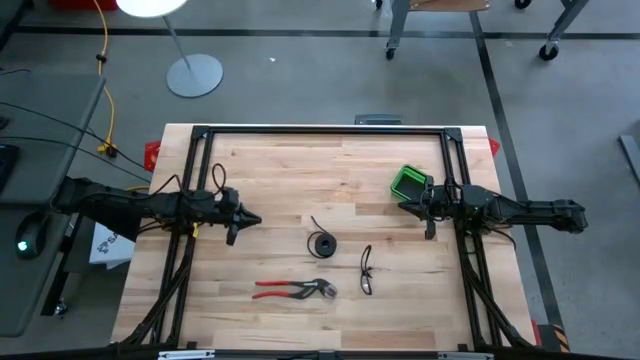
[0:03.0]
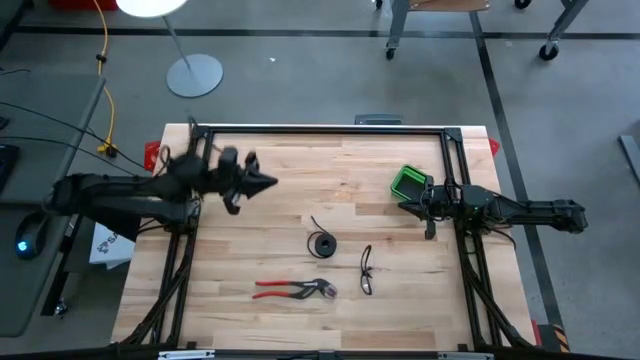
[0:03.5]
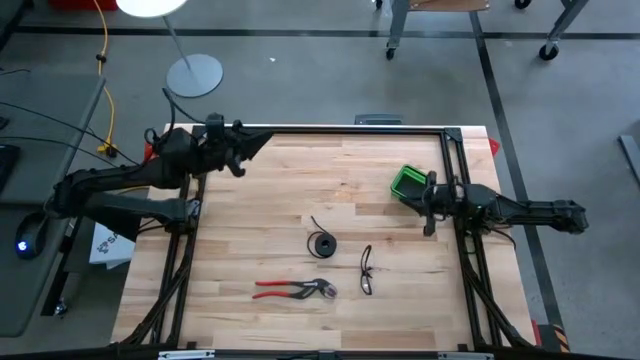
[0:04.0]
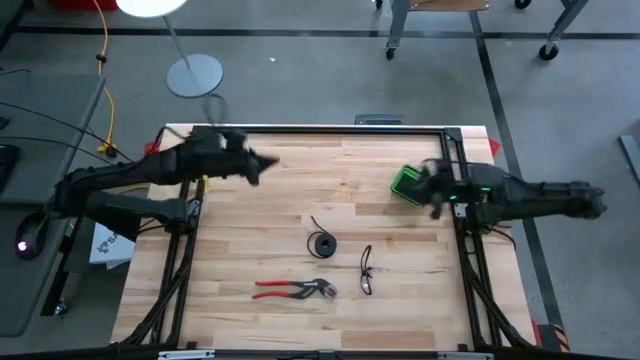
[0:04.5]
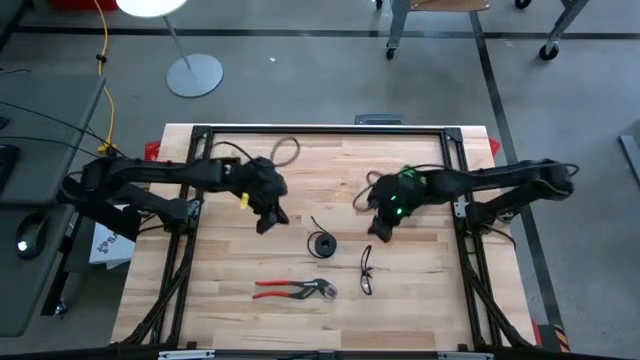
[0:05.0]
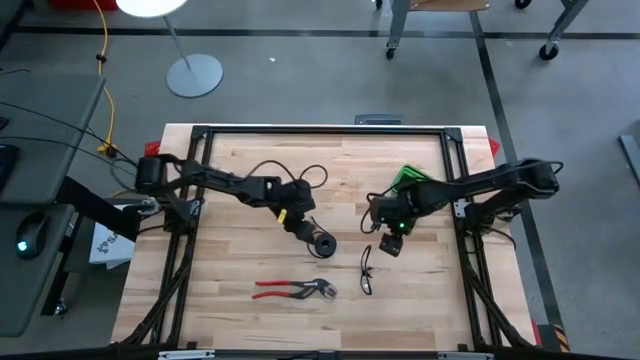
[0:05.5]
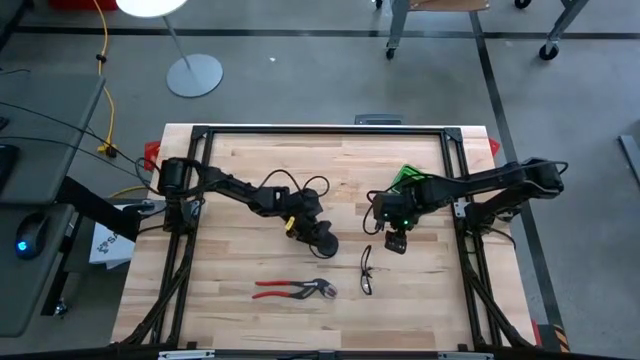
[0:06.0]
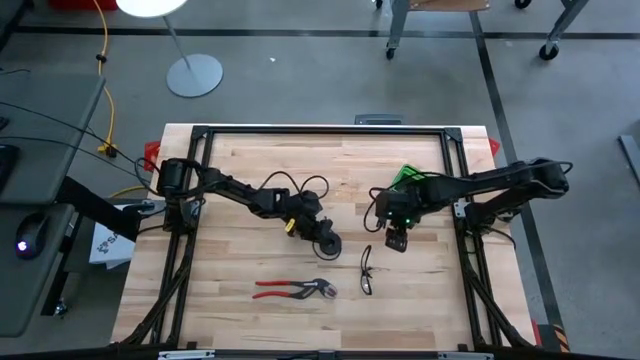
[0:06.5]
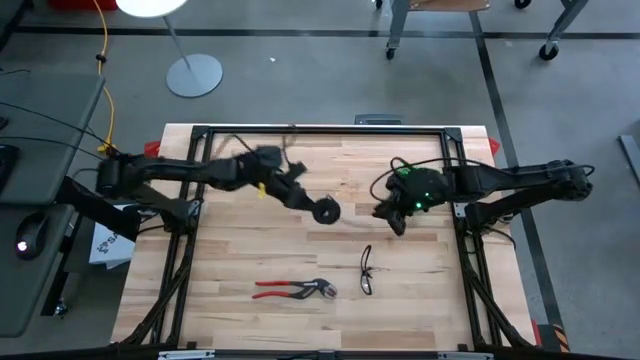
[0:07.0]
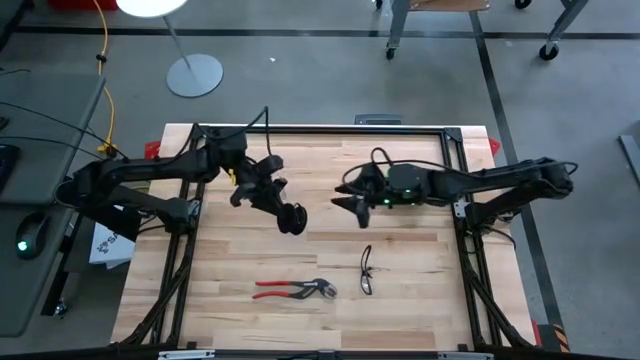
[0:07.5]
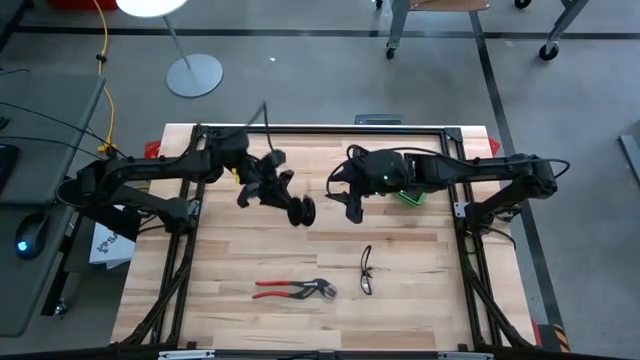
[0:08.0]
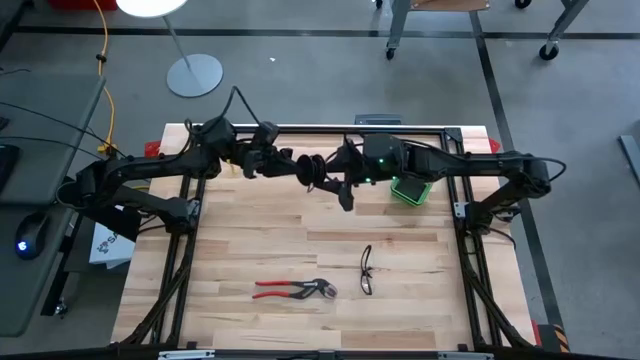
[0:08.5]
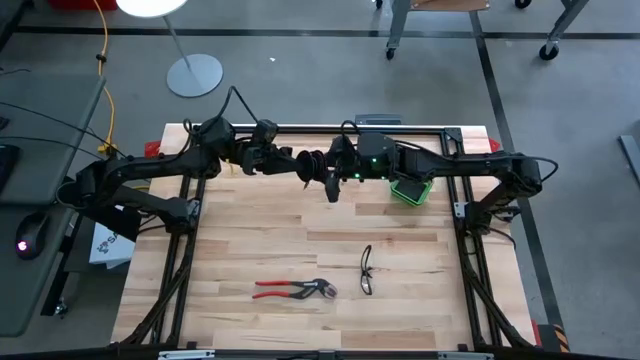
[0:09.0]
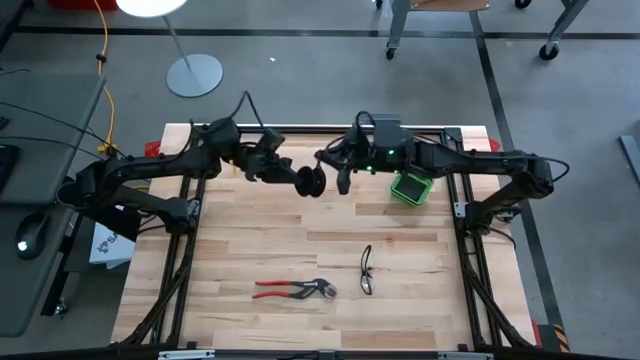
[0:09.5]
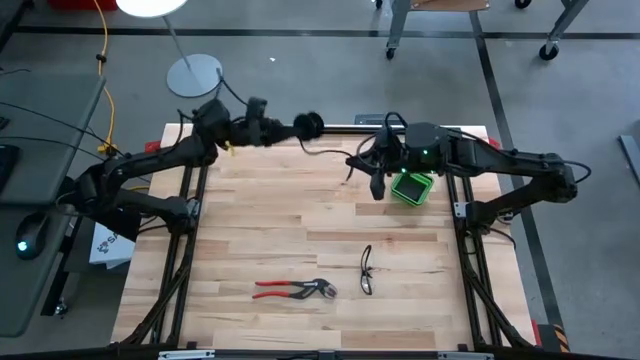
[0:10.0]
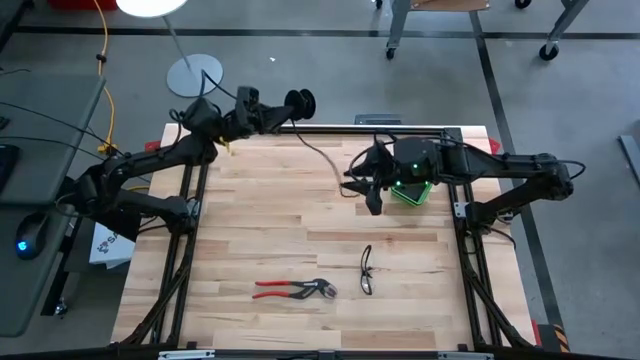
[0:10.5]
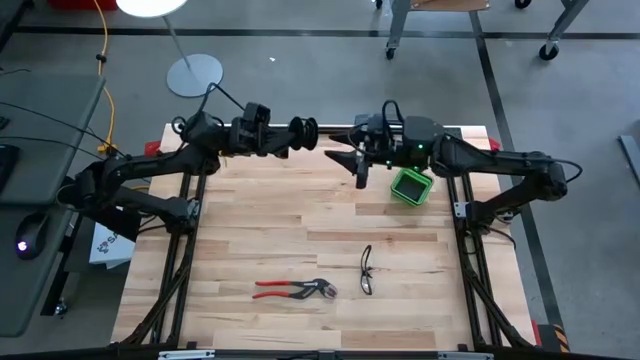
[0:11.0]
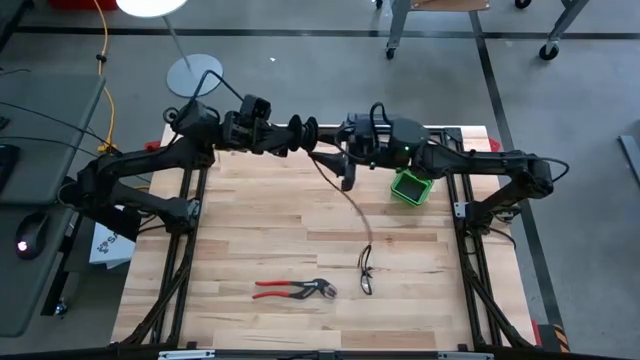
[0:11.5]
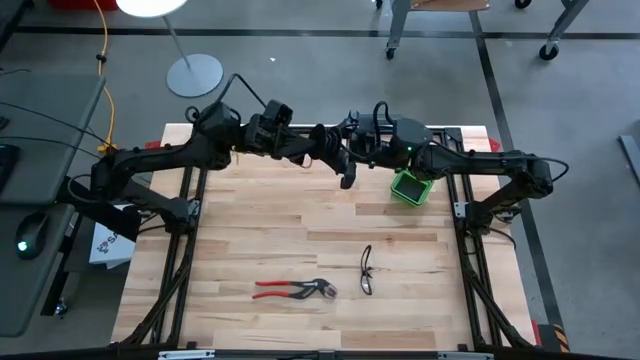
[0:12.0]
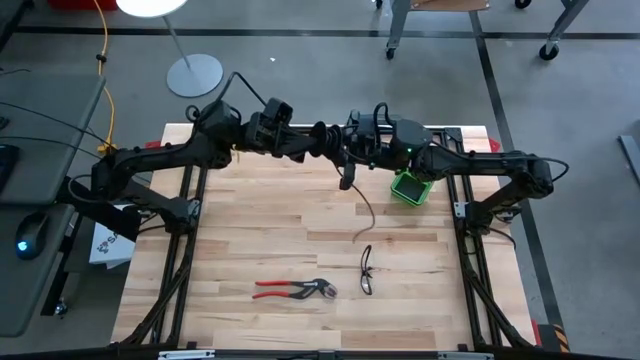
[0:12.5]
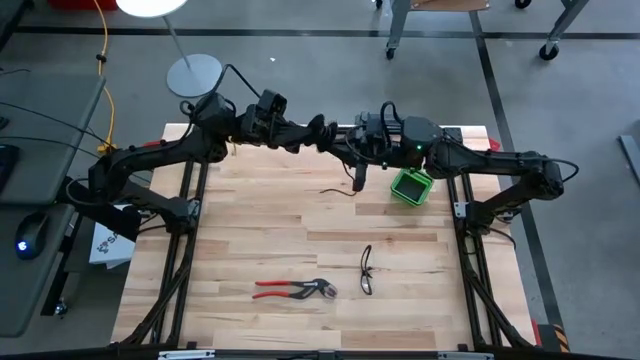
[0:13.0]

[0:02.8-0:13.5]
Task: Coil cords
Uncoil the black wire from the black spool

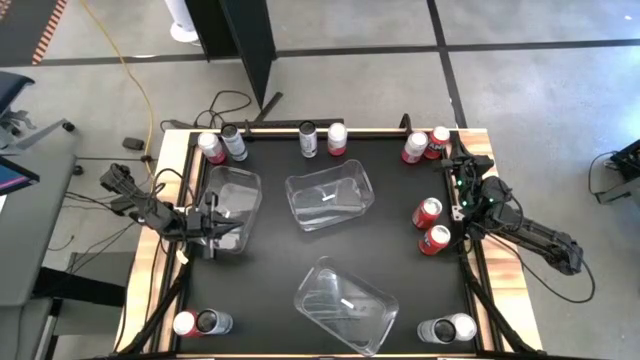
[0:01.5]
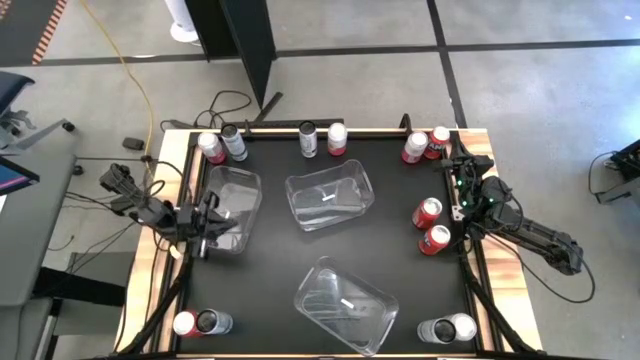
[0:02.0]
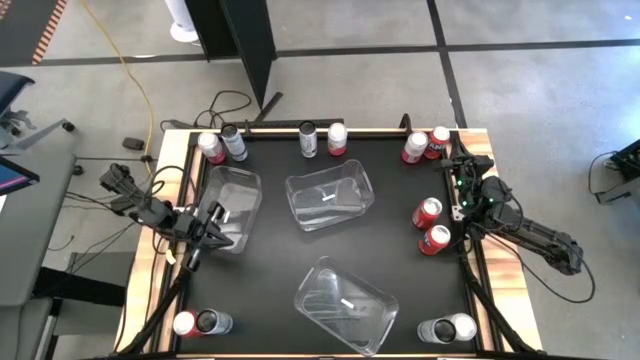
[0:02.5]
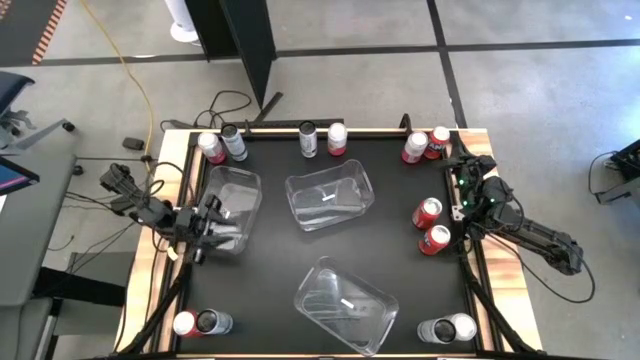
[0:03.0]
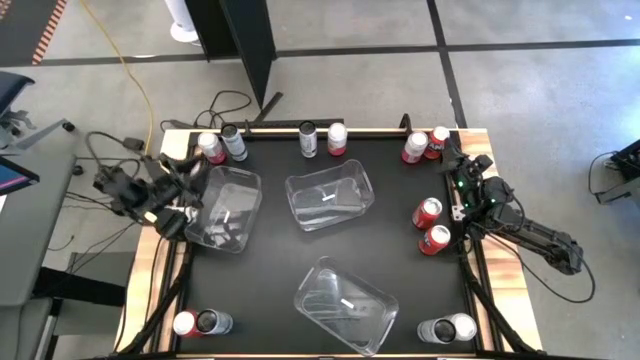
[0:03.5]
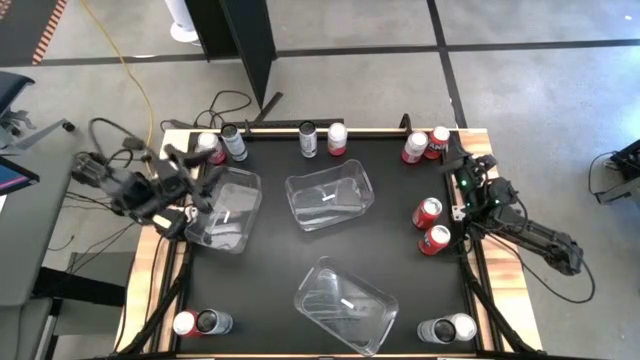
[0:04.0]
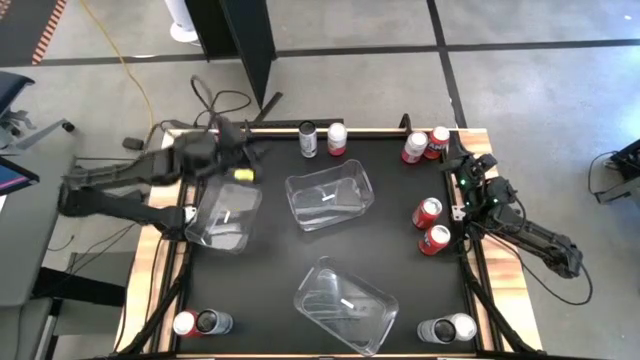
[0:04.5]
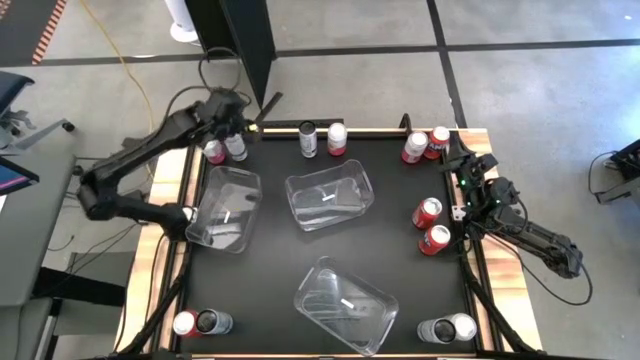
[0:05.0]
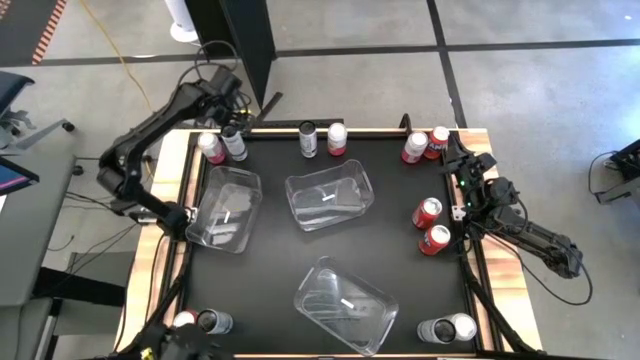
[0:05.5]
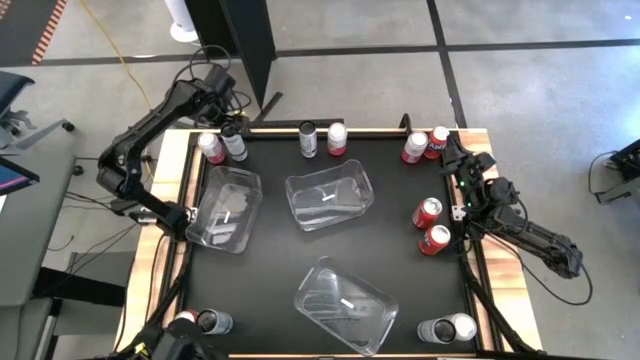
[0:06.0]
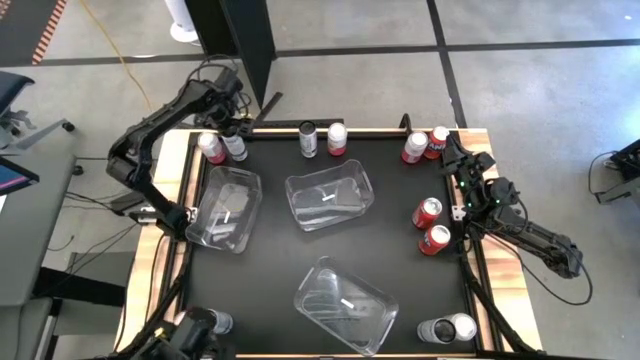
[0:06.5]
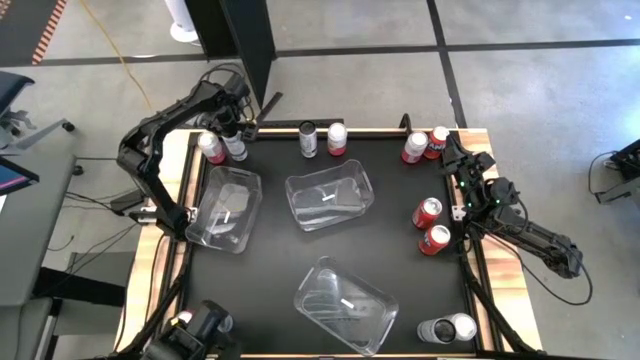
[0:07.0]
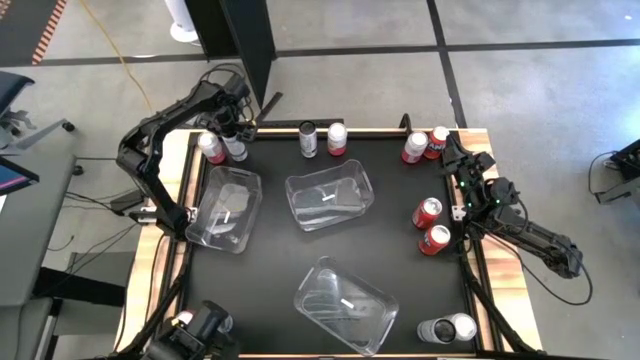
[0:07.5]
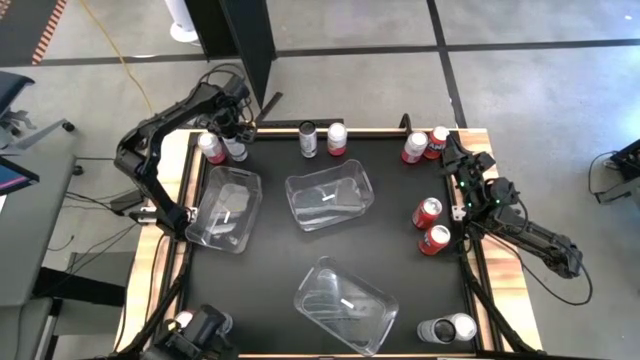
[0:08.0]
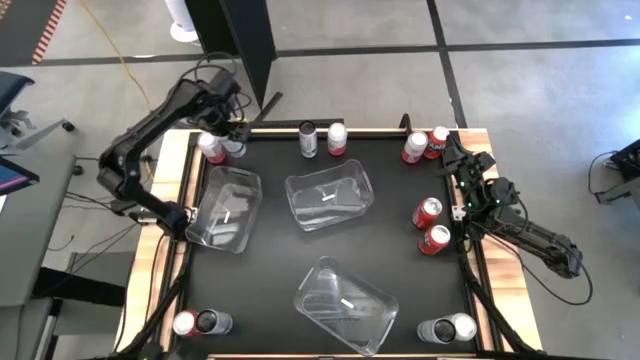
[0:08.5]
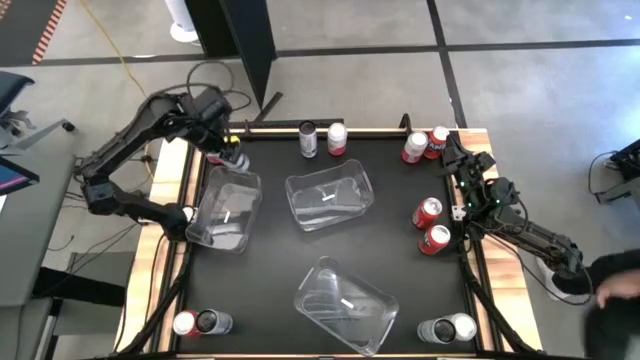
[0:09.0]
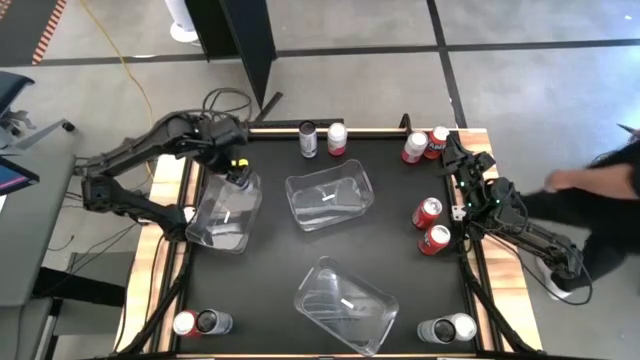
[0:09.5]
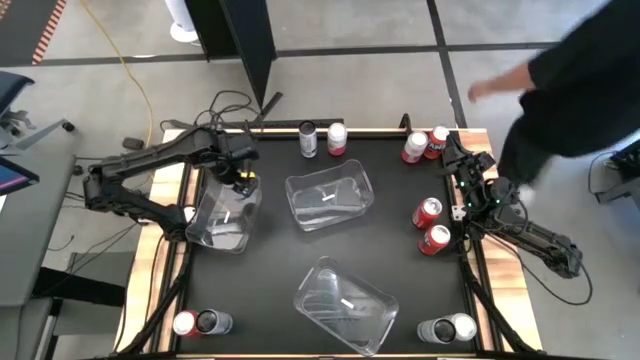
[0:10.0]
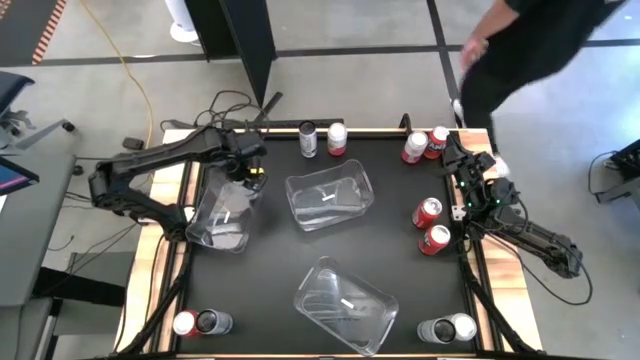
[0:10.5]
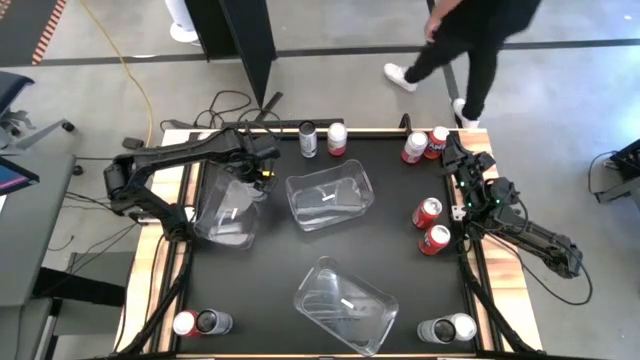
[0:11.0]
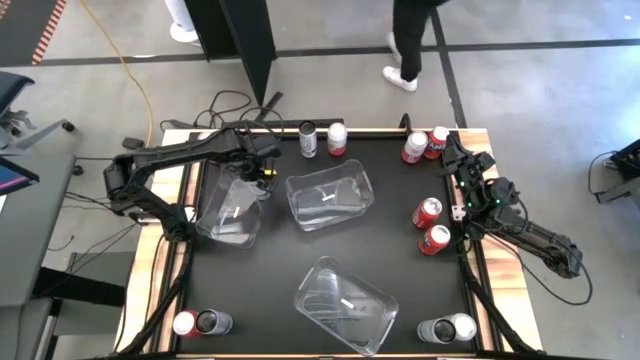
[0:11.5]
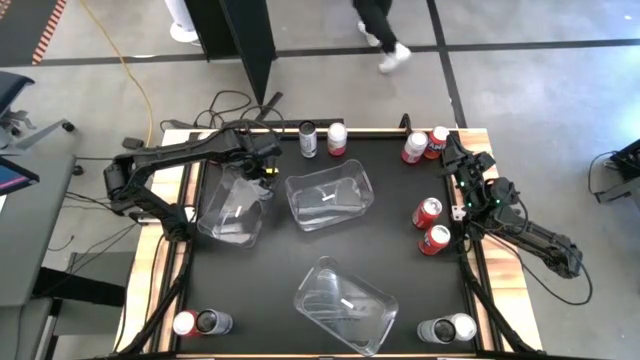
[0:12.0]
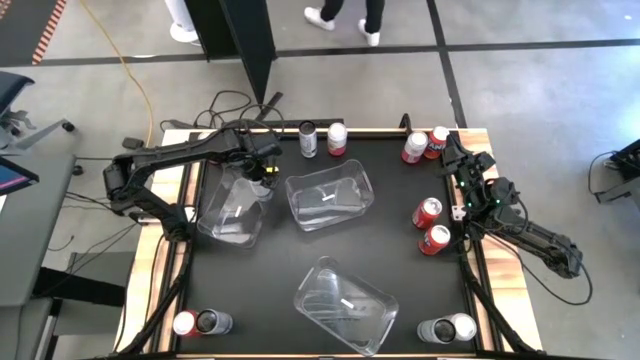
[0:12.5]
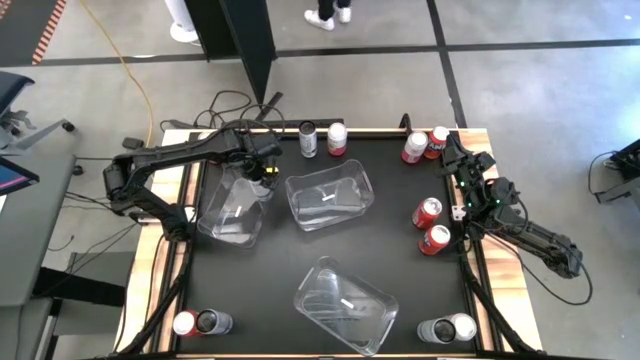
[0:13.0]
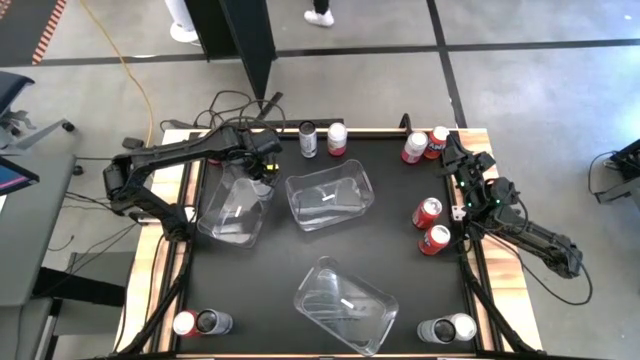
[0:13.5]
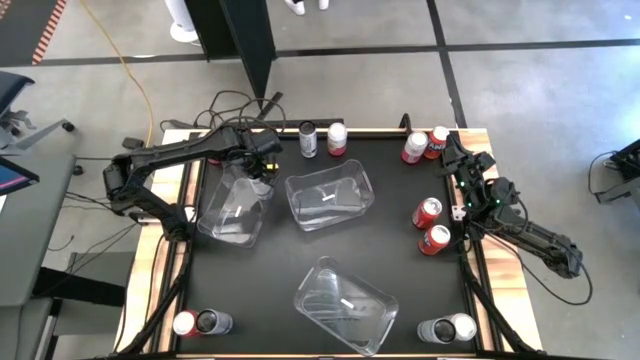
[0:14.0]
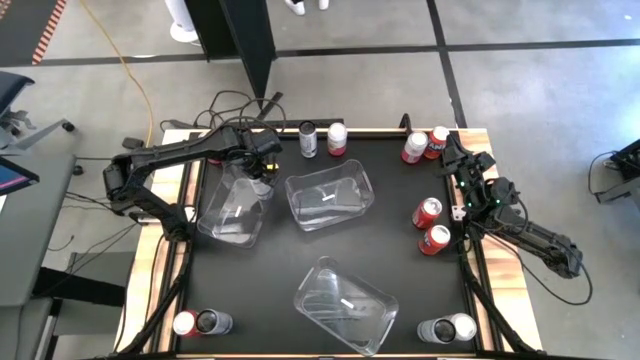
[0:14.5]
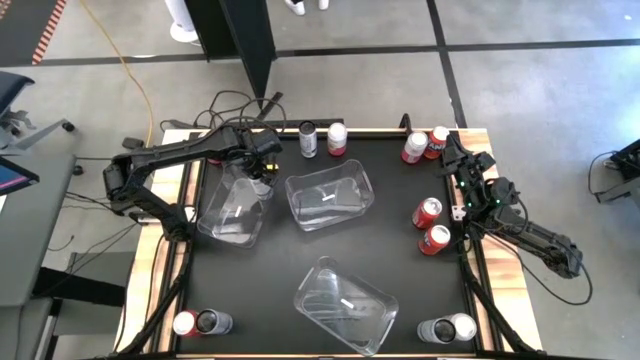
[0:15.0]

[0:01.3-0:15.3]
Task: Sort soda cans
Put the top left black soda can in the top left transparent bin
